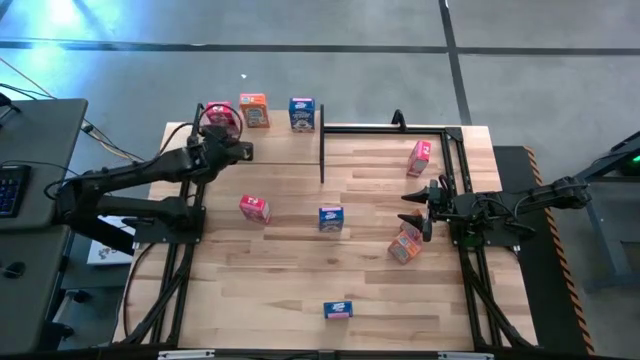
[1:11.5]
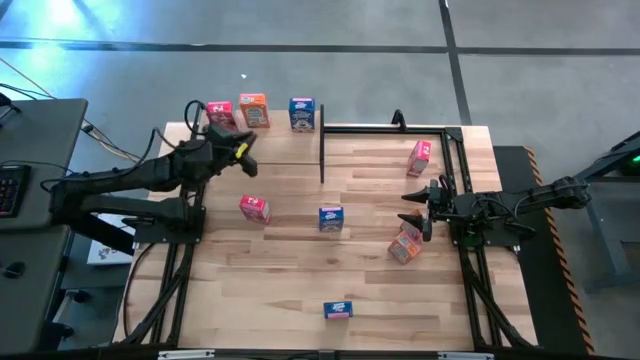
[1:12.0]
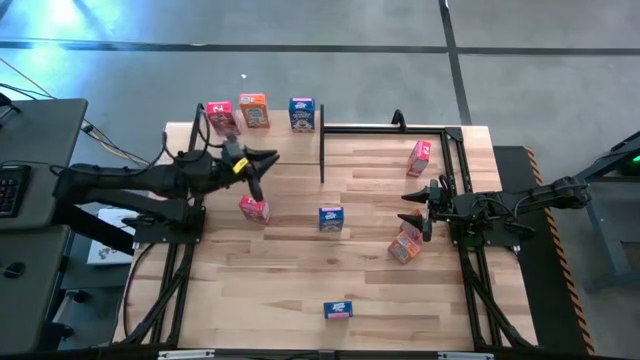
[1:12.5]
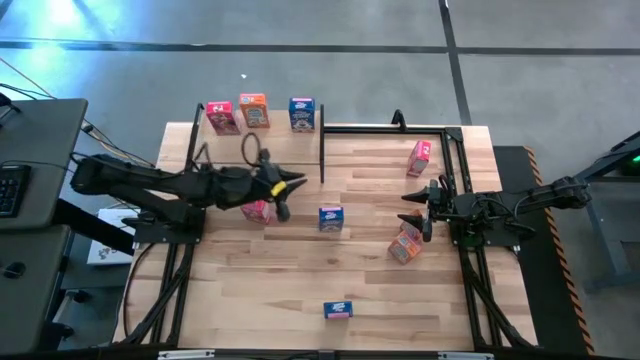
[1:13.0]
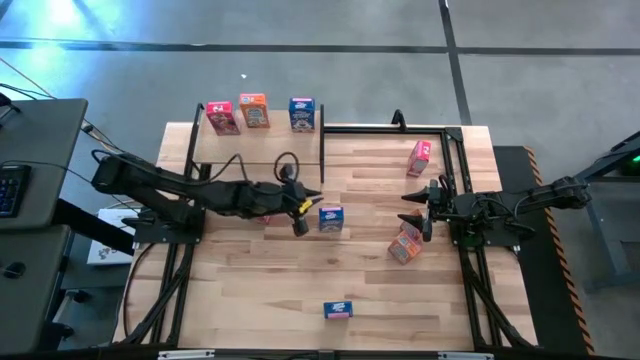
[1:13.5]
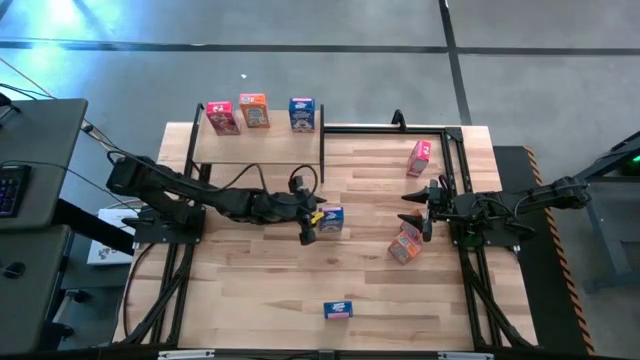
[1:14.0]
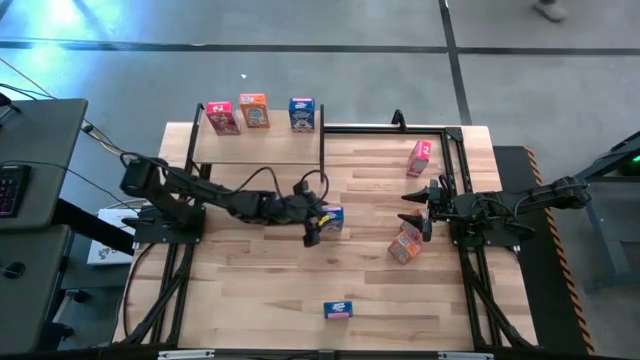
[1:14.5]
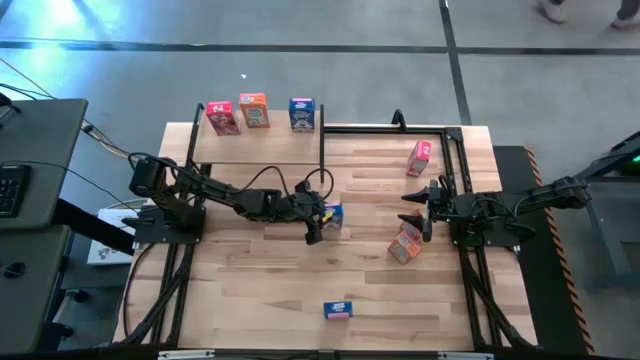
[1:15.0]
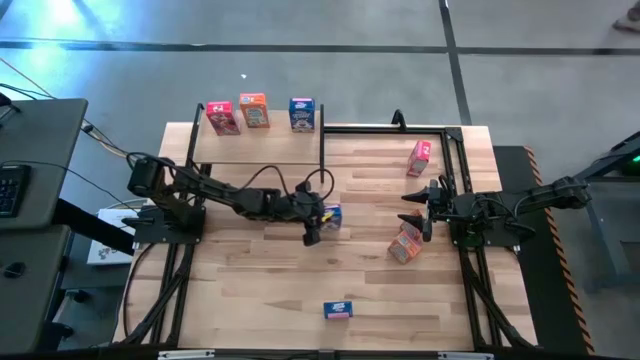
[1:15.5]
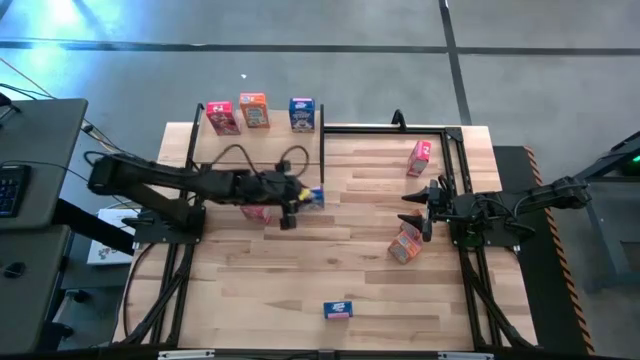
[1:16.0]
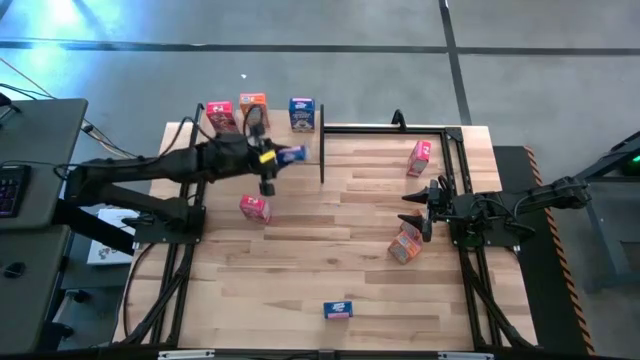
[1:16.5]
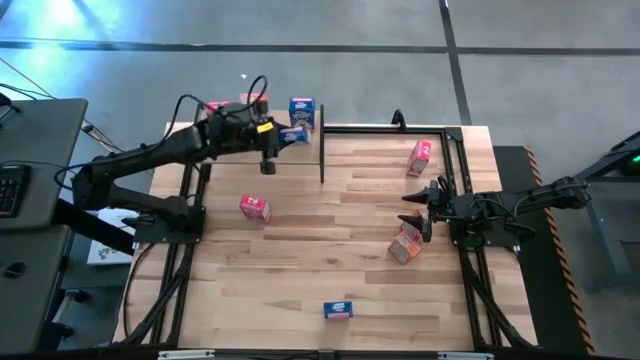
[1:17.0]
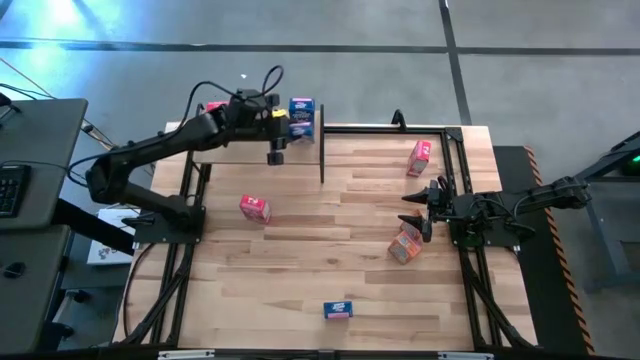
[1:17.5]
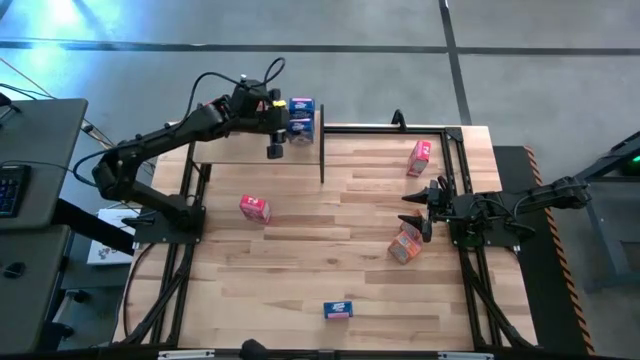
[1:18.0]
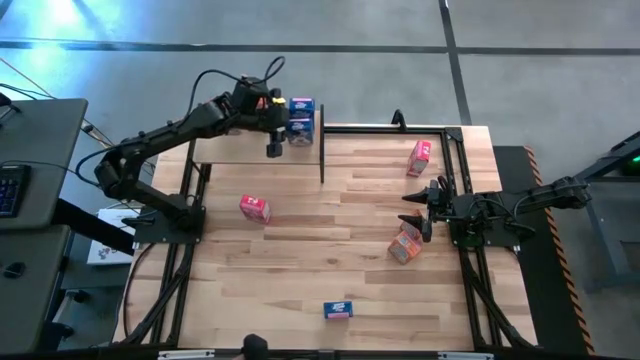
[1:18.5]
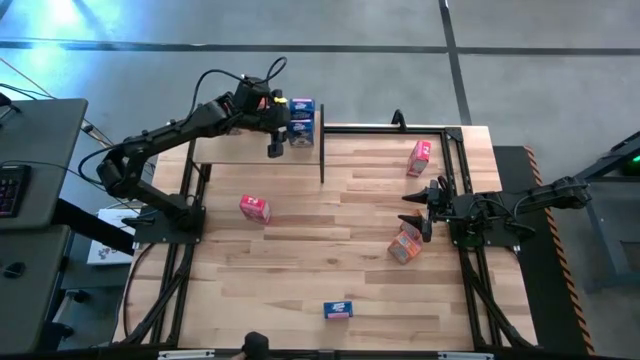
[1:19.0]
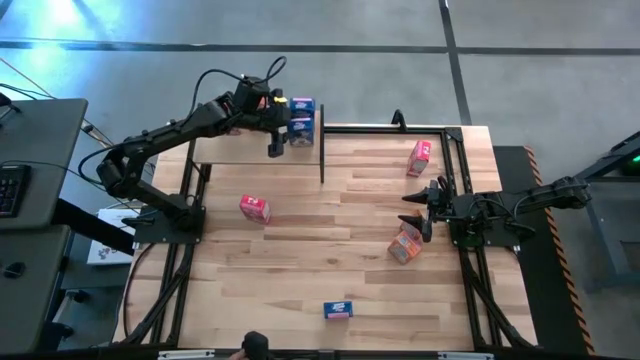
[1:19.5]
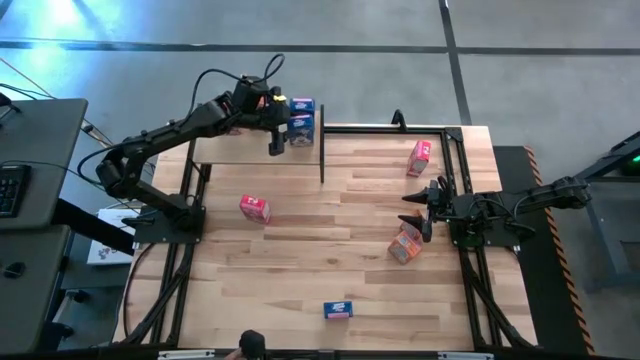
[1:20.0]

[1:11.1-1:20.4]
Task: Stack cereal on shelf
Put the top blue cereal box on the the shelf aligned with the other blue cereal box

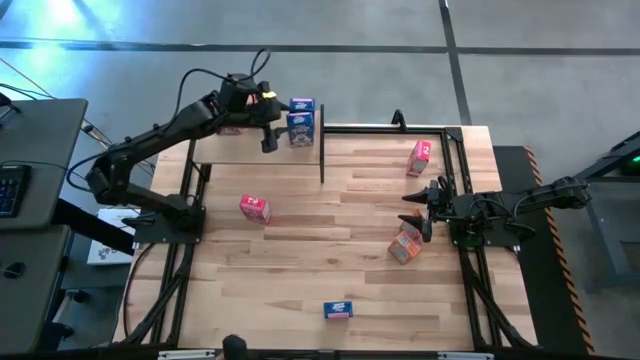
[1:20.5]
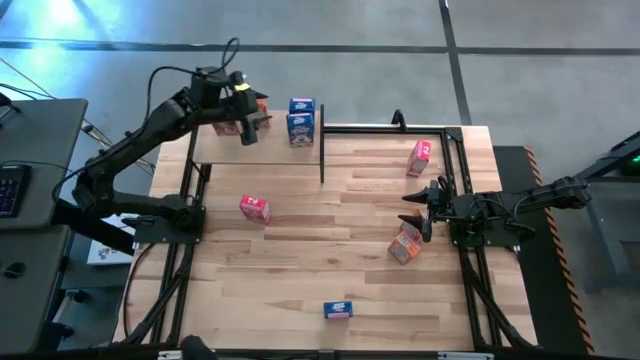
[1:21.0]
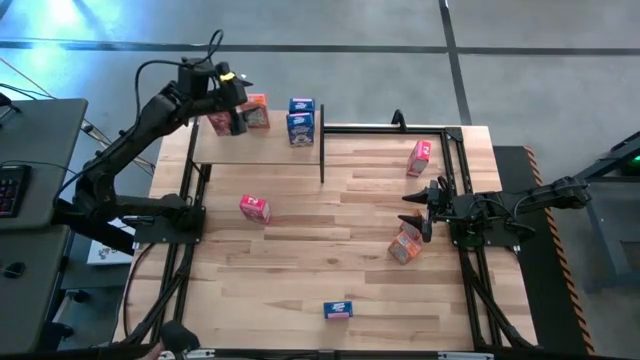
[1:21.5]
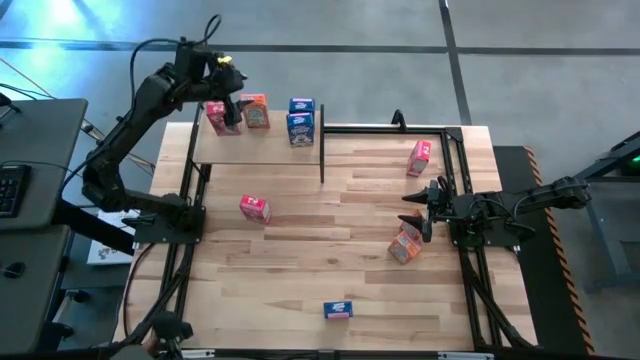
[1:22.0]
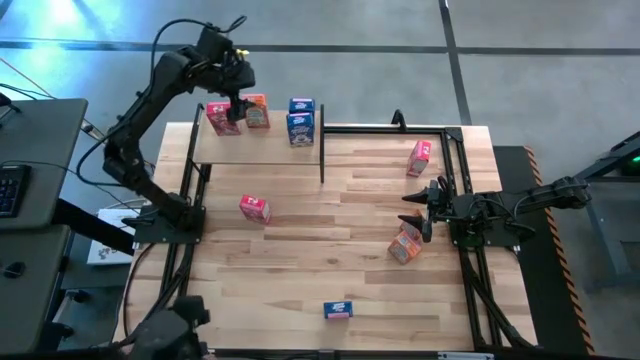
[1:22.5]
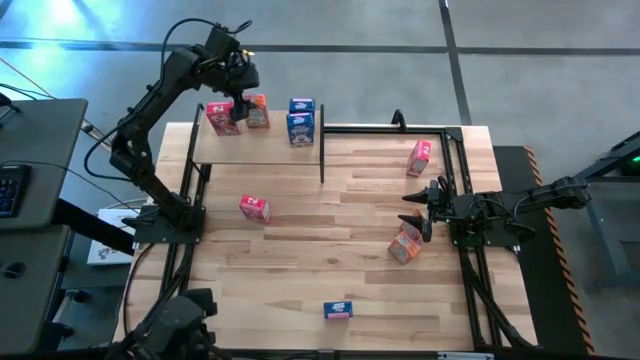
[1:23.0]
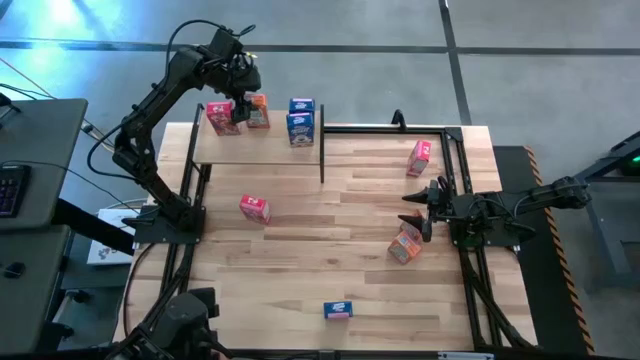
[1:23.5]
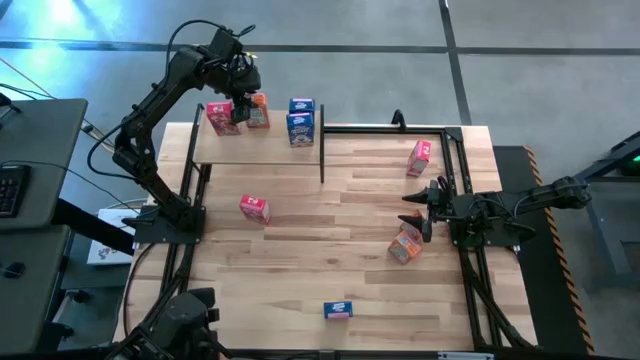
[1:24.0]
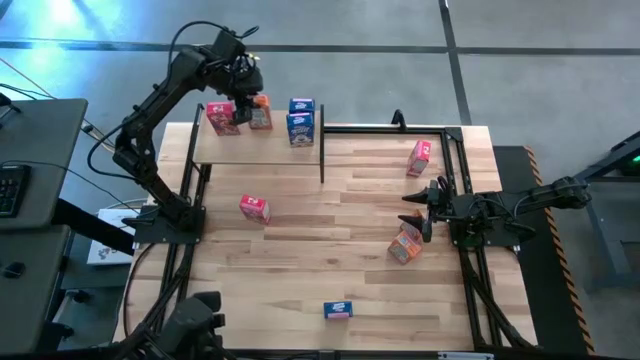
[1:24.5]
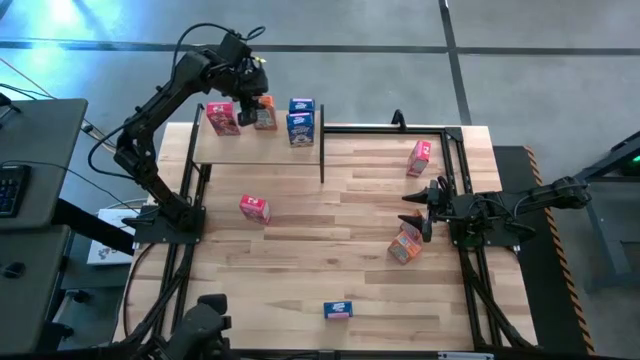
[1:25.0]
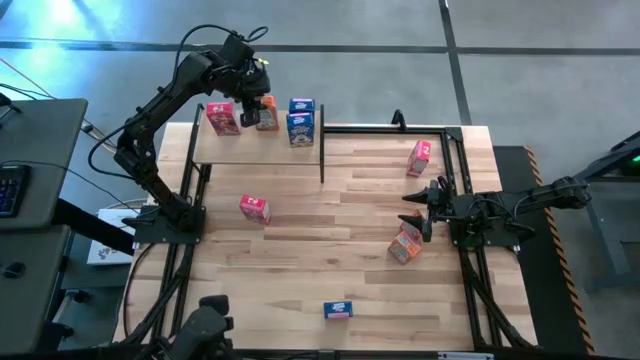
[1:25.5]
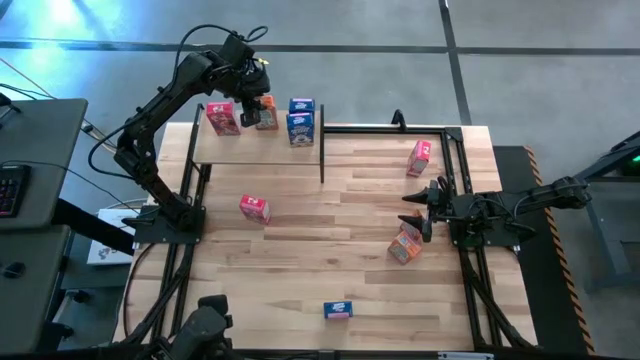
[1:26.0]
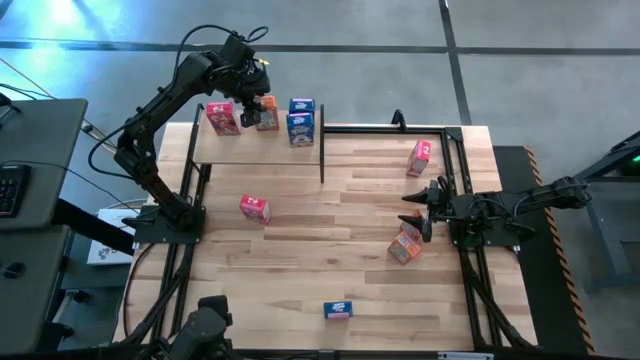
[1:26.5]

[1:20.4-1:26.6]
Adjust the orange cereal box on the the shelf

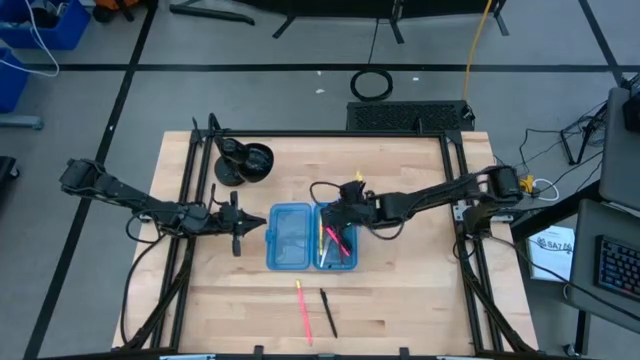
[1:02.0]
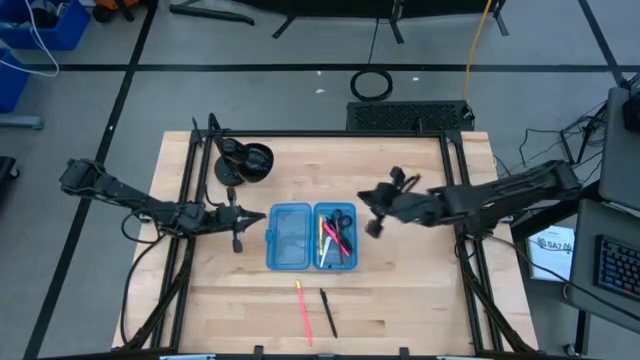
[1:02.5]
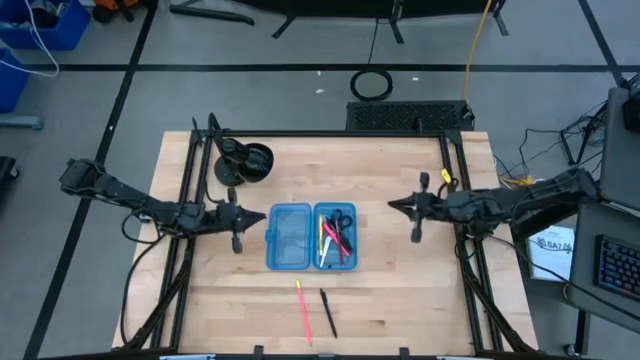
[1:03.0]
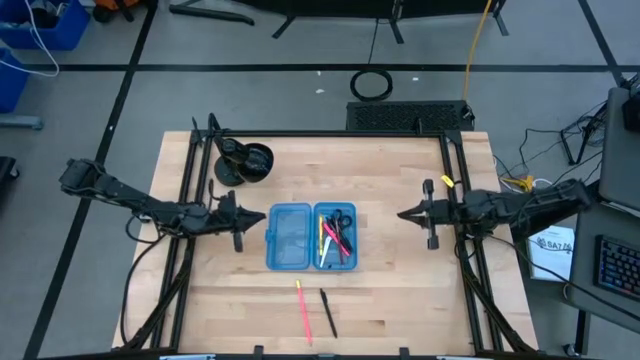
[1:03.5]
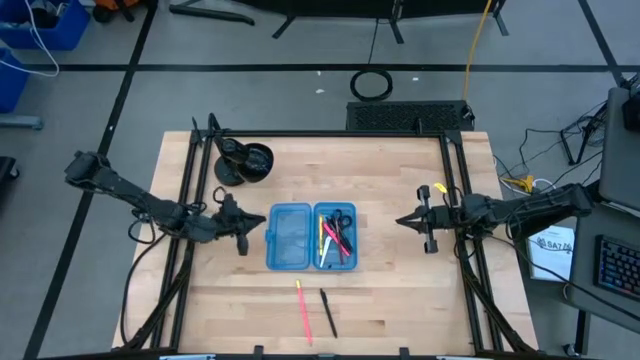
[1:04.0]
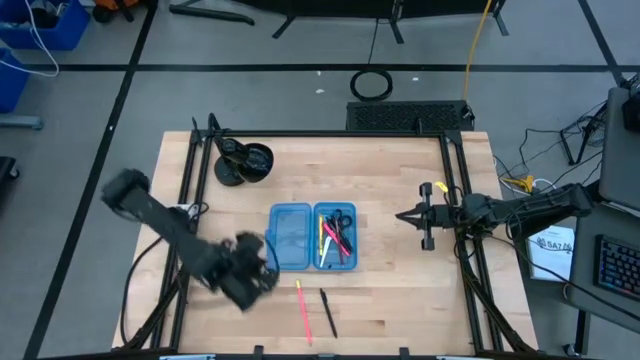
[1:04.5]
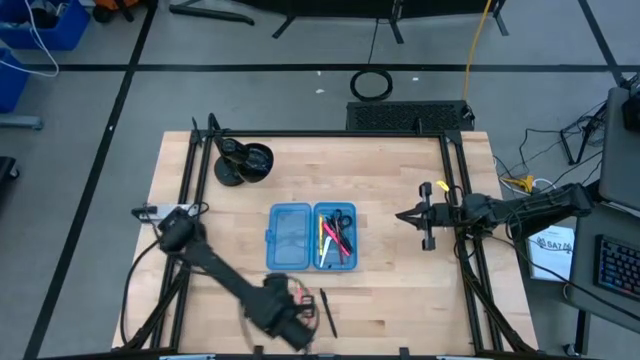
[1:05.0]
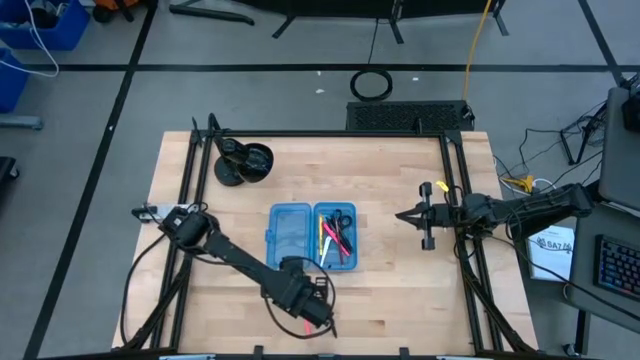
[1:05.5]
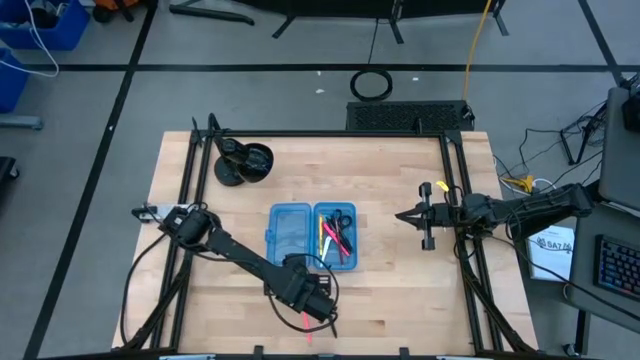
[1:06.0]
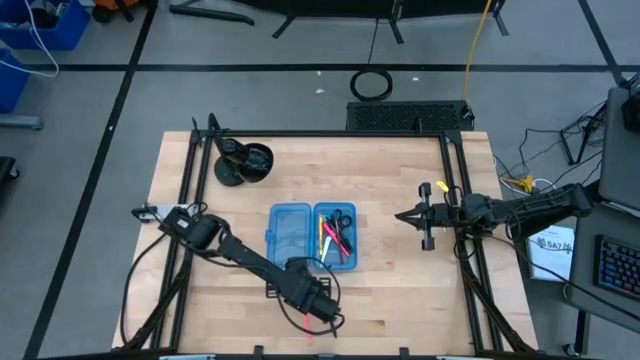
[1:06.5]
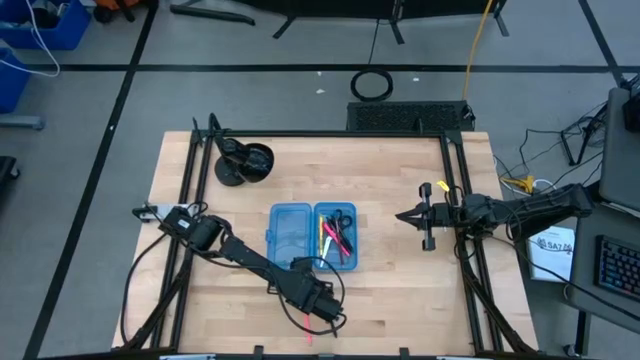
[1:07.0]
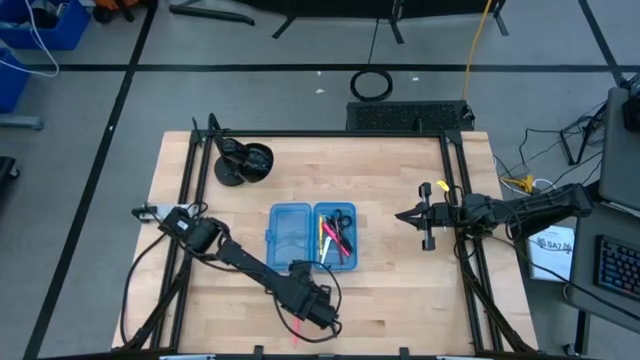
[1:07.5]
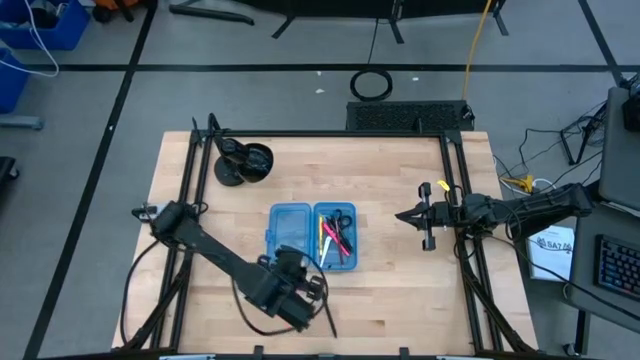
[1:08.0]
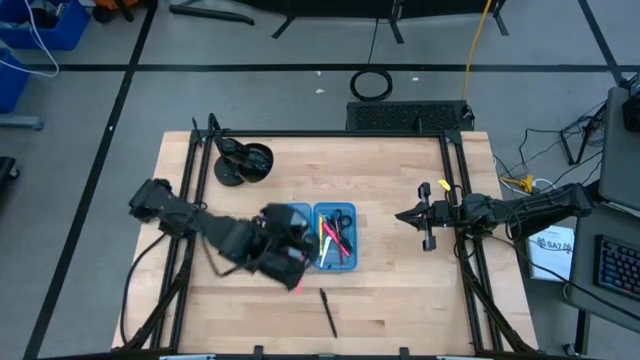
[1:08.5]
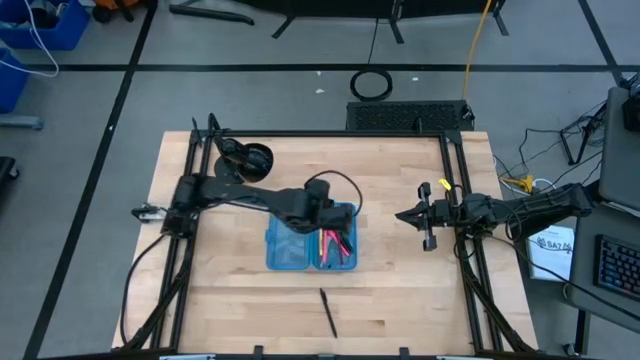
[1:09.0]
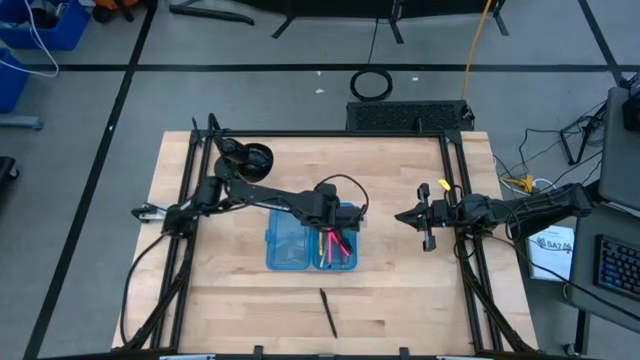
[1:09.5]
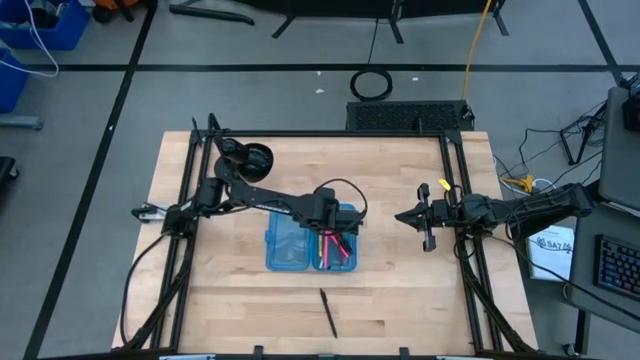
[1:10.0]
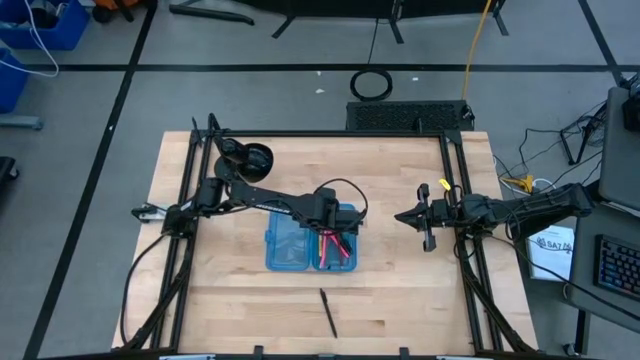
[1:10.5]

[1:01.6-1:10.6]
Task: Pick & place school supplies into a supply box
Put the pink pencil into the blue supply box
